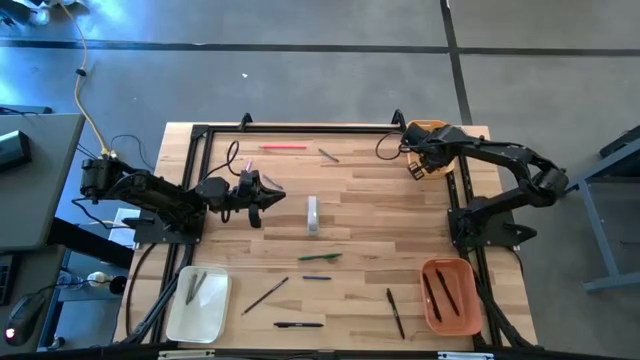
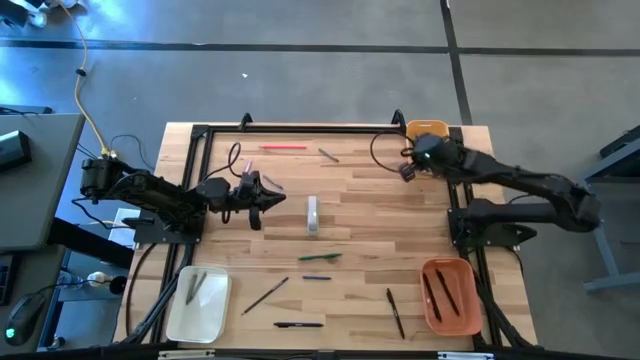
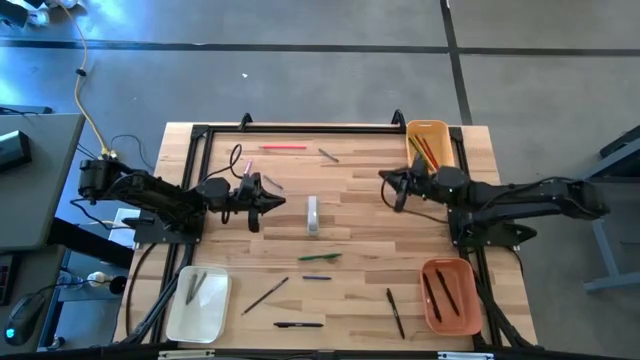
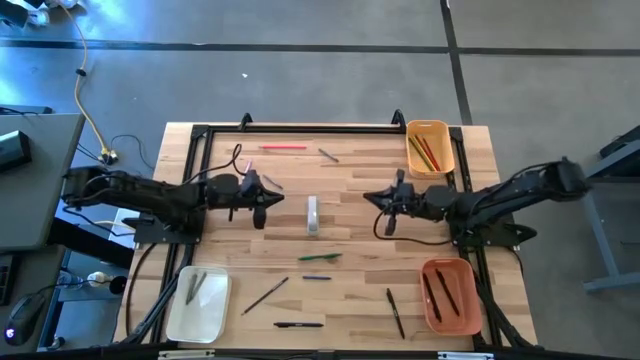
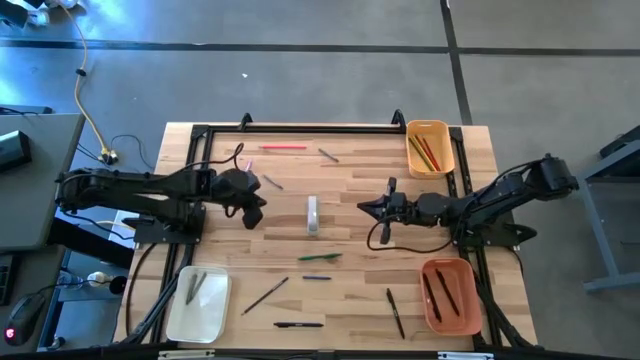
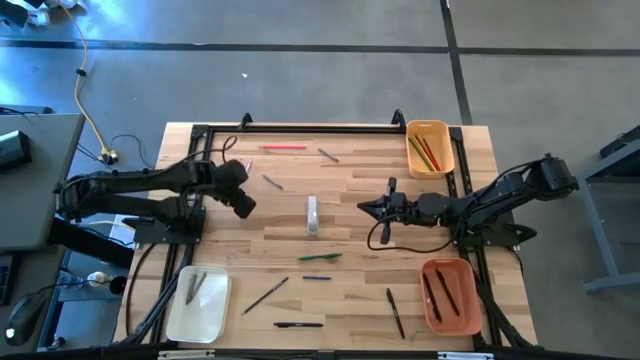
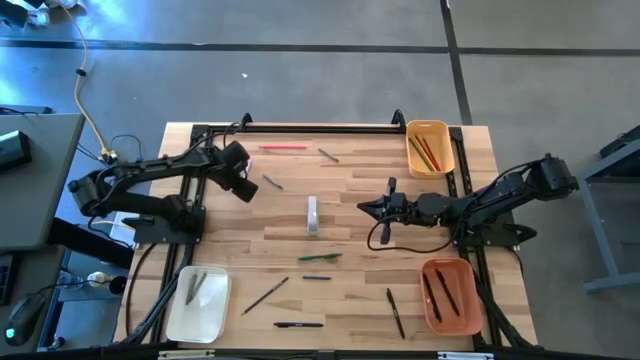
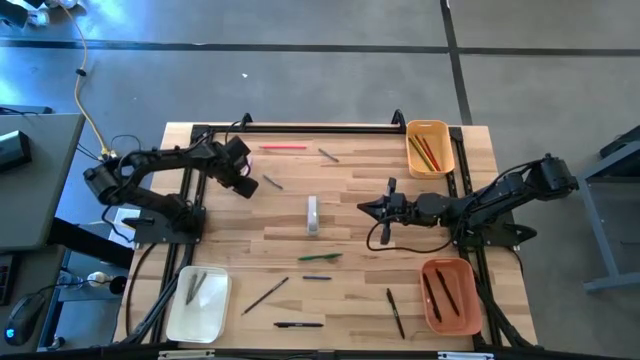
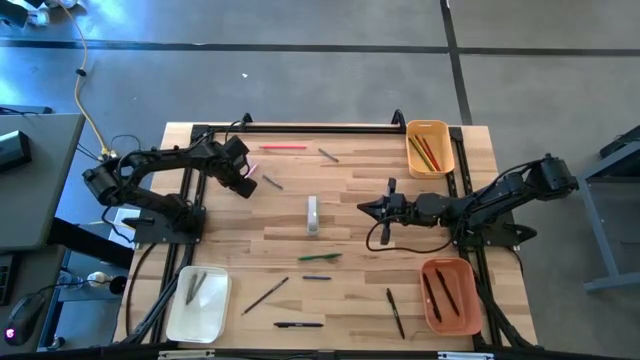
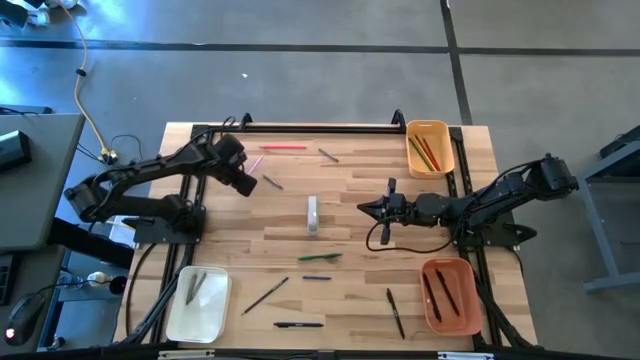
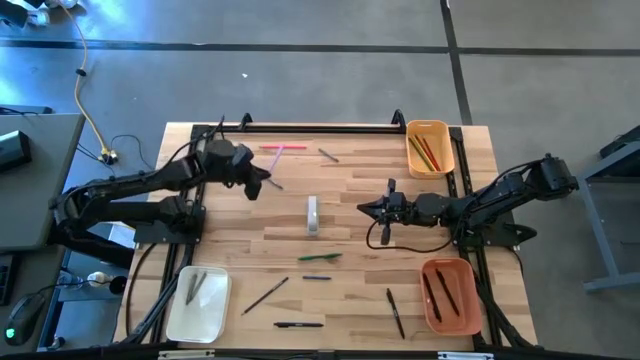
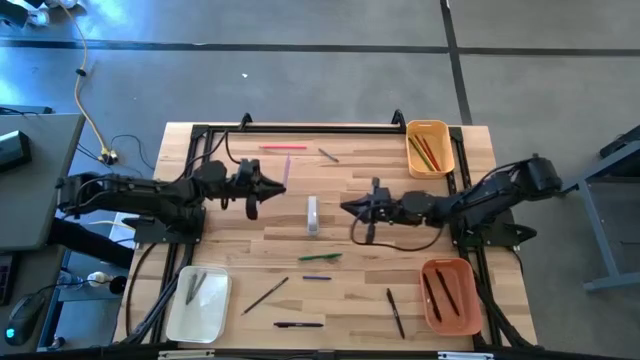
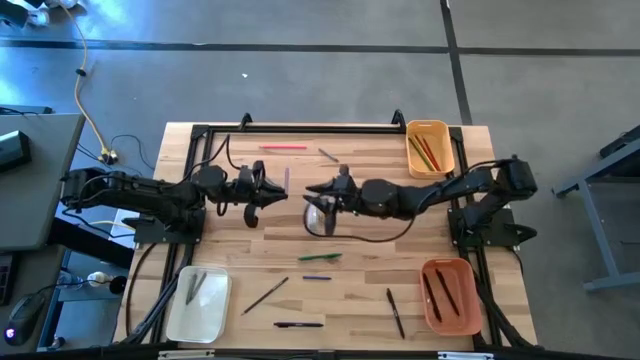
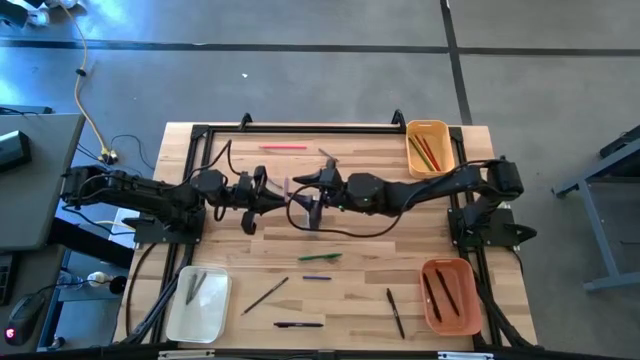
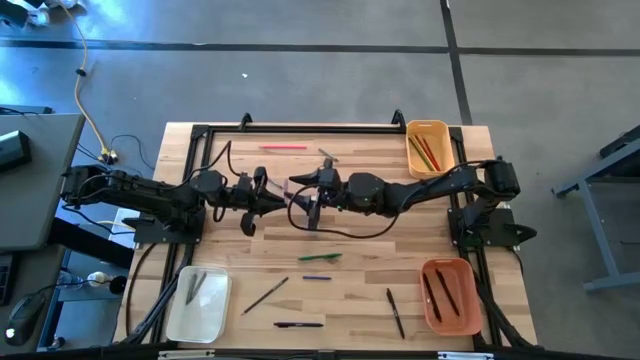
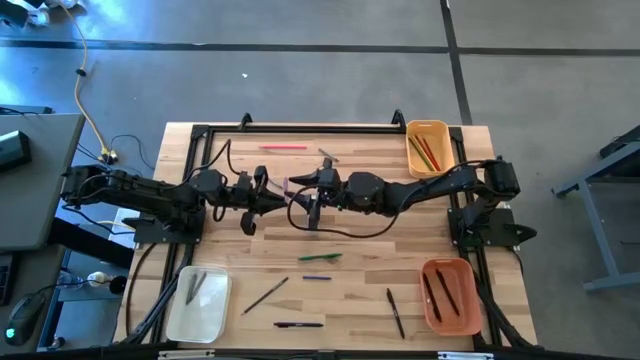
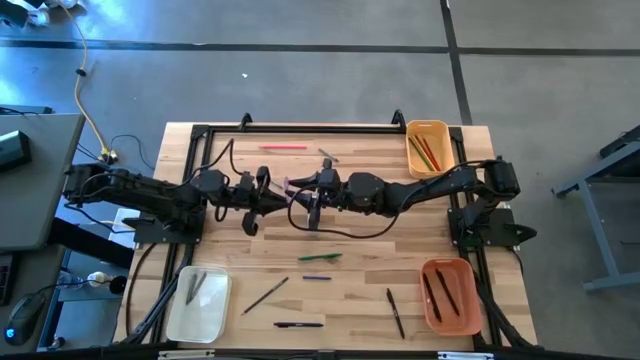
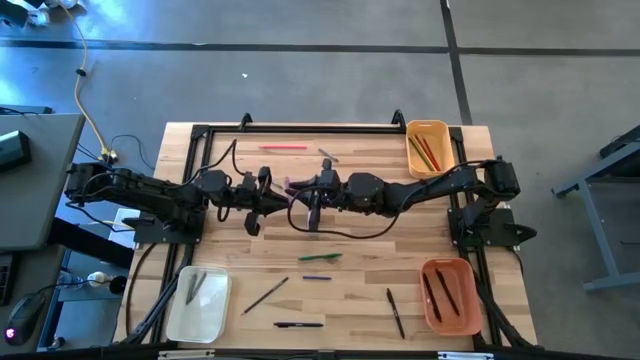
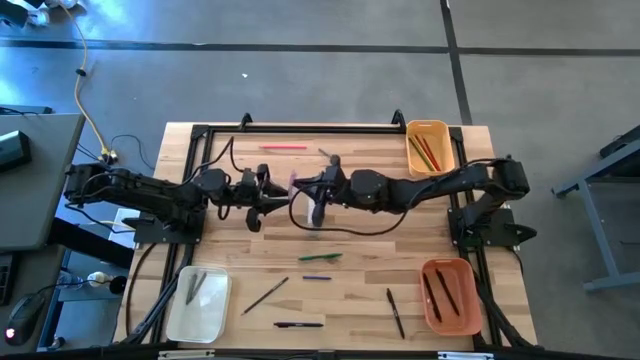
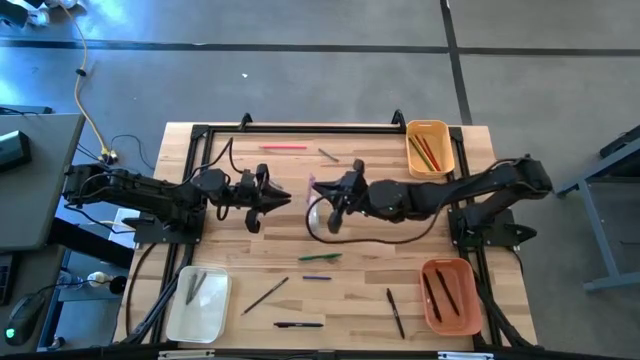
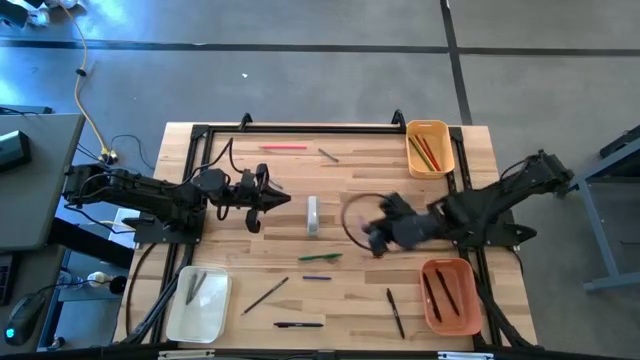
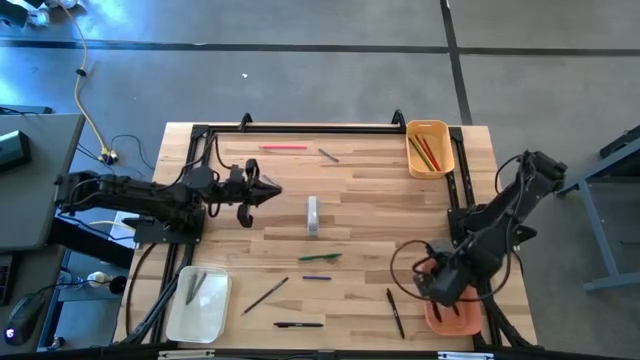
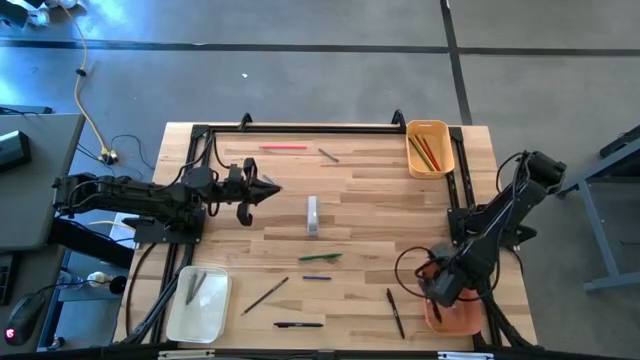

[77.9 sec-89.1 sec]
Task: Sort crayons/erasers/pens/pencils in bins
Put the violet pen into the orange bin

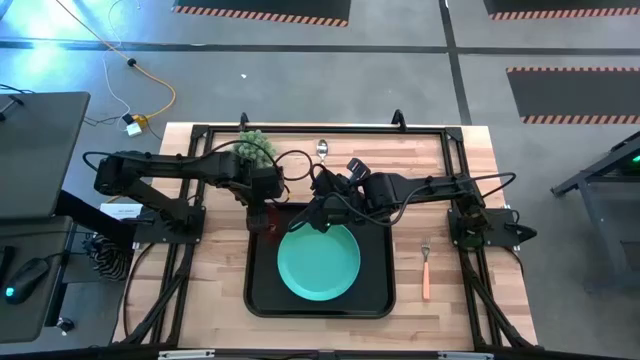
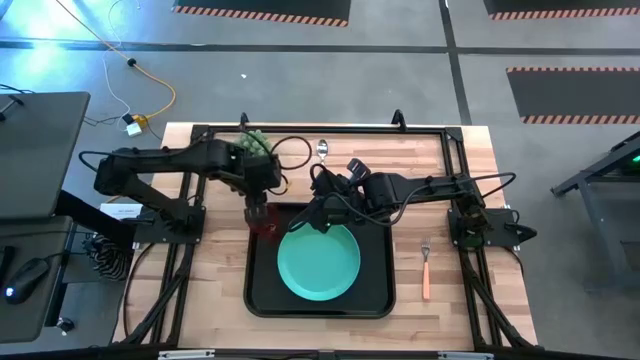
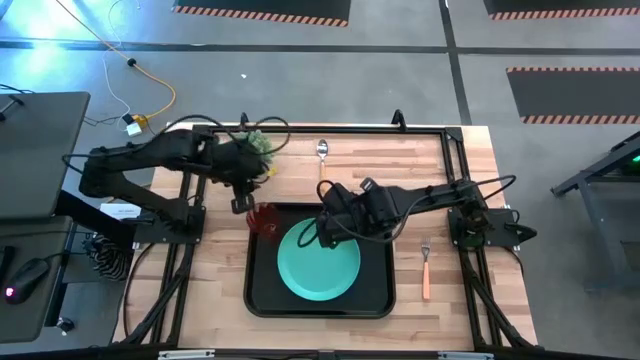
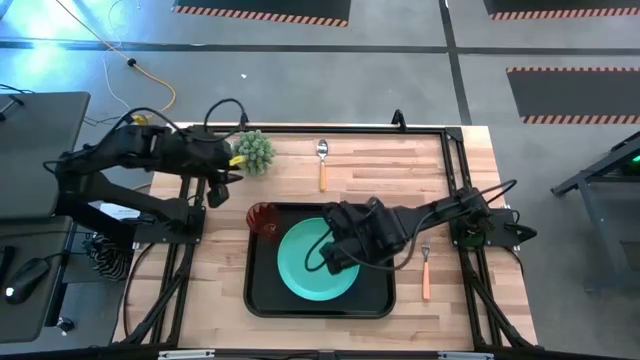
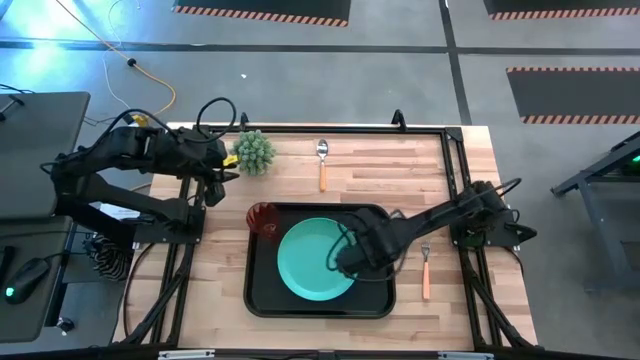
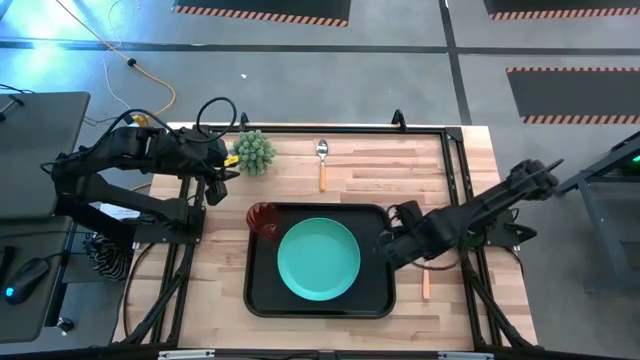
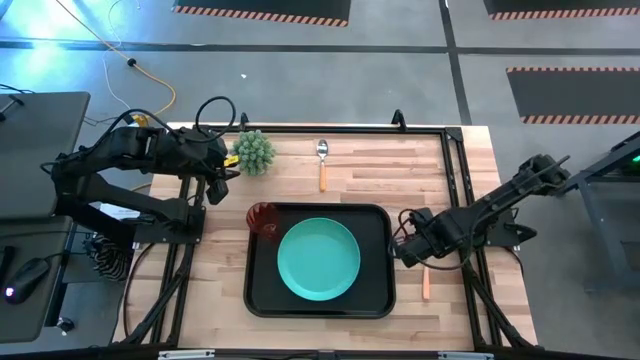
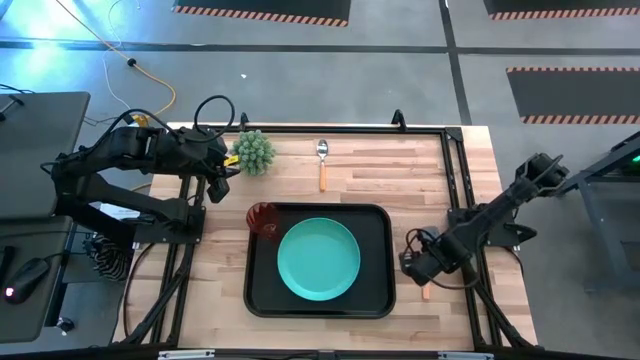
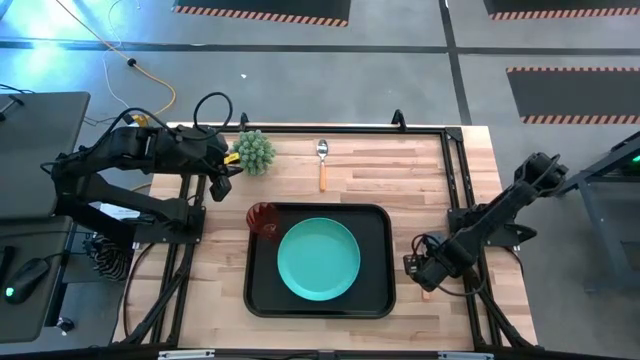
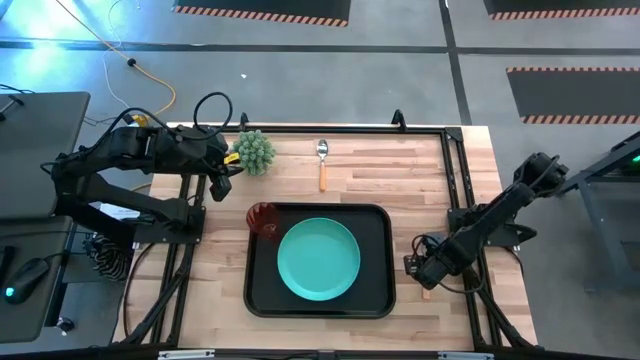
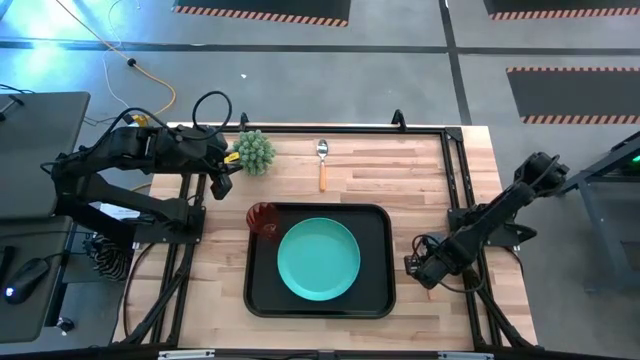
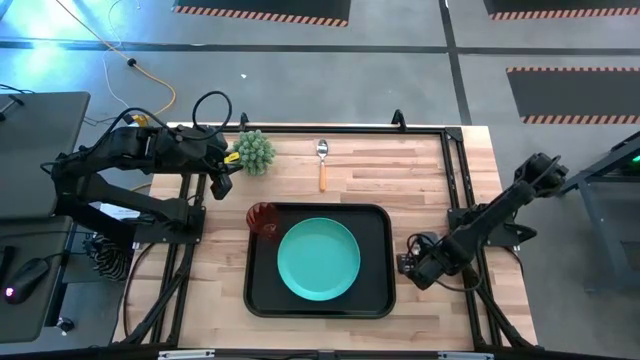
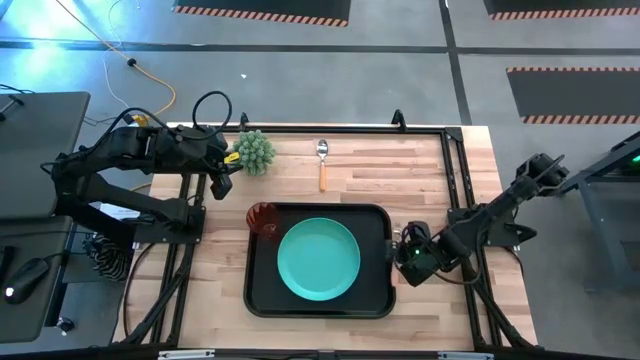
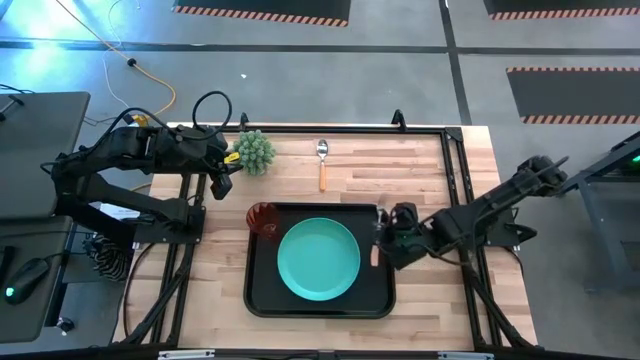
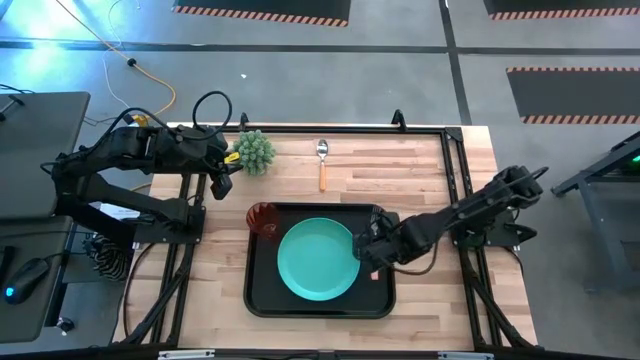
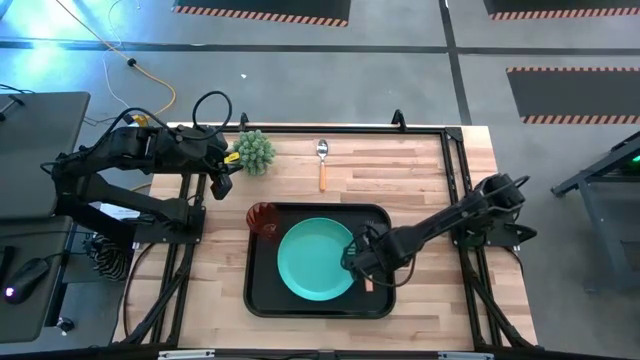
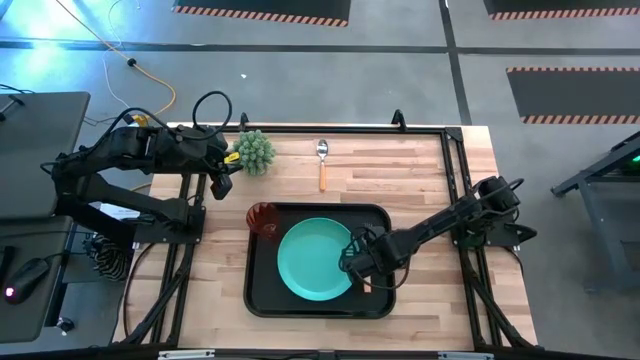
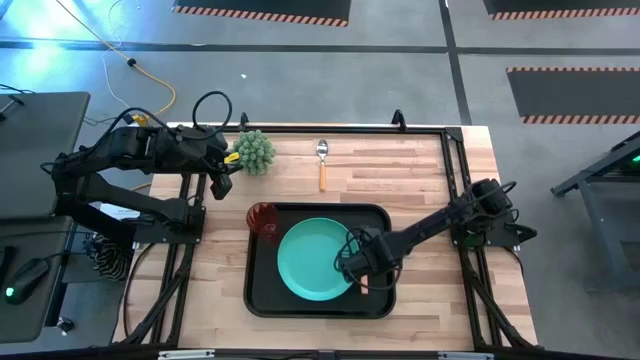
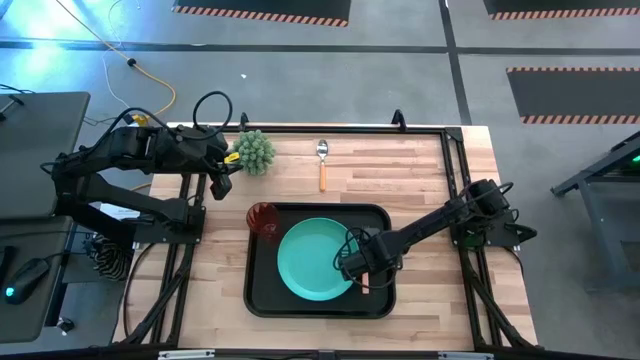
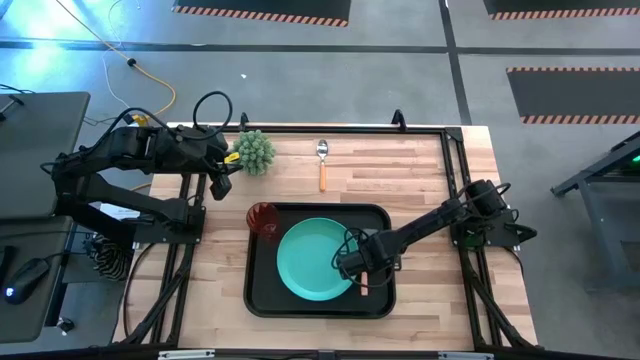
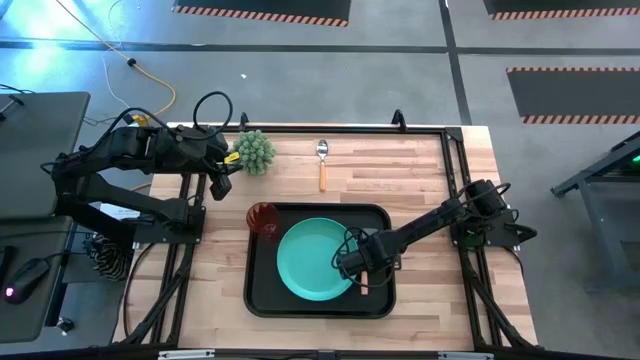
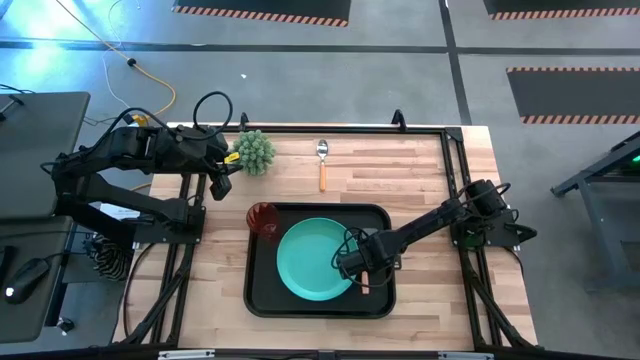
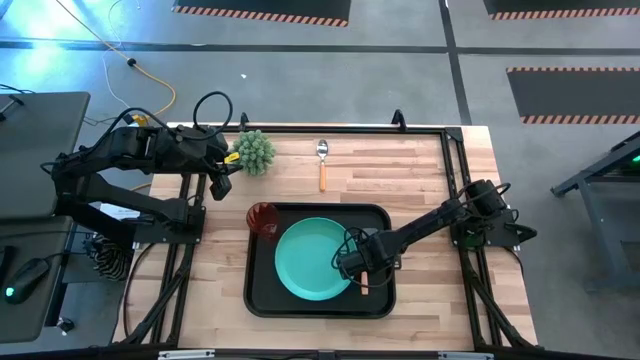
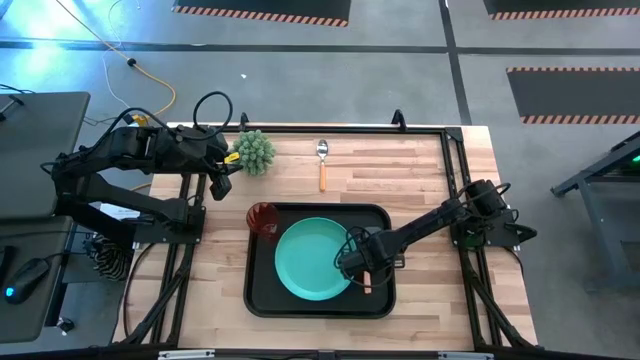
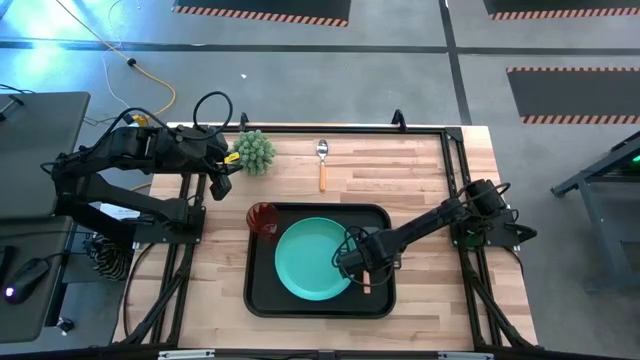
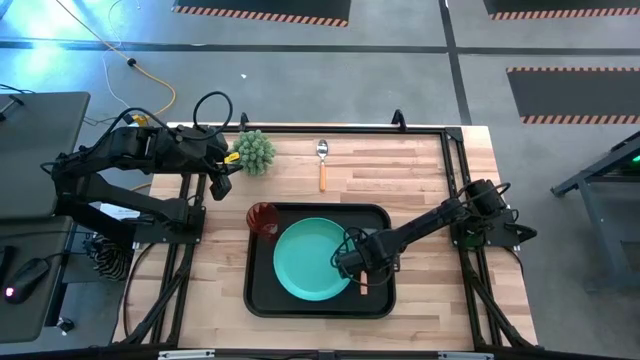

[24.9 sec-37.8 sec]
Task: Pick and place plate/cup/fork/spoon on tray
Put the orange fork on the black tray to the right of the green plate
